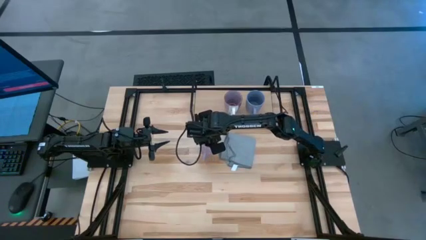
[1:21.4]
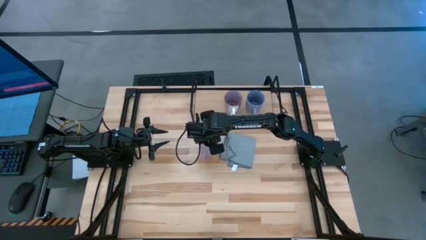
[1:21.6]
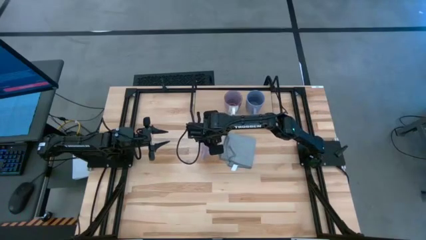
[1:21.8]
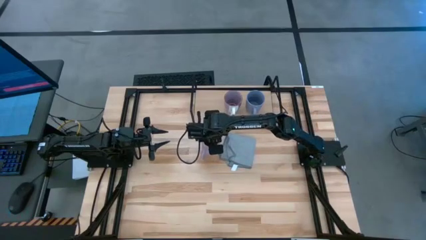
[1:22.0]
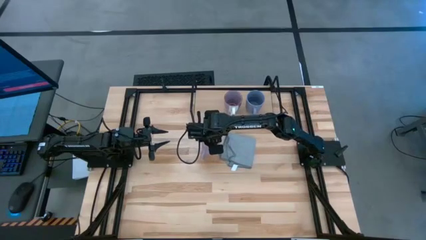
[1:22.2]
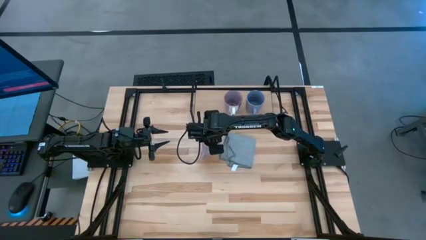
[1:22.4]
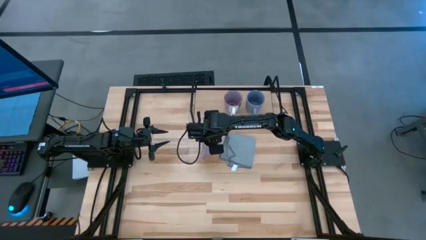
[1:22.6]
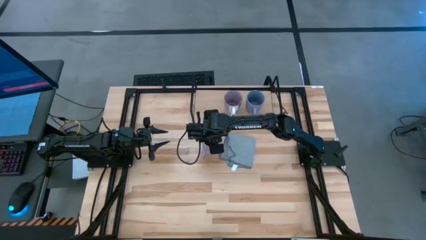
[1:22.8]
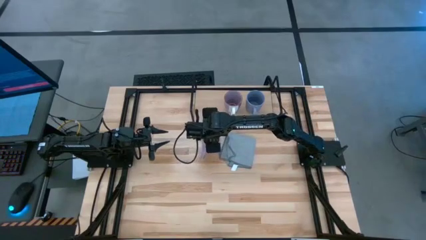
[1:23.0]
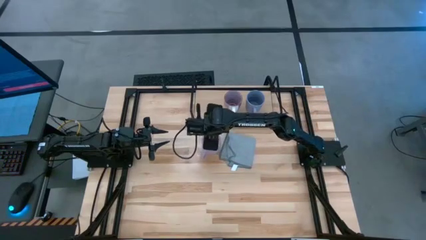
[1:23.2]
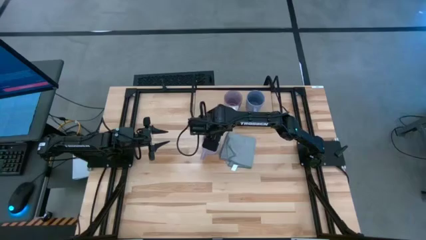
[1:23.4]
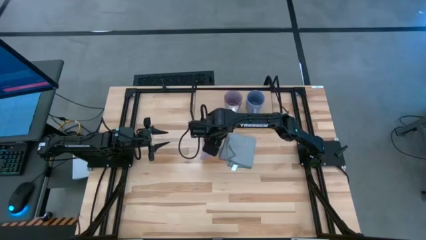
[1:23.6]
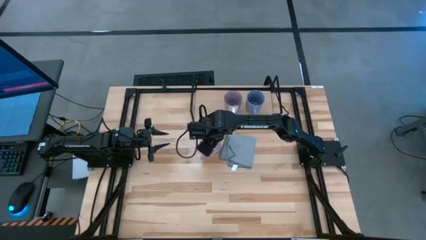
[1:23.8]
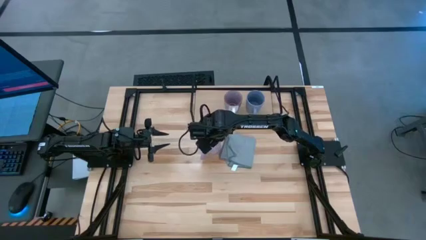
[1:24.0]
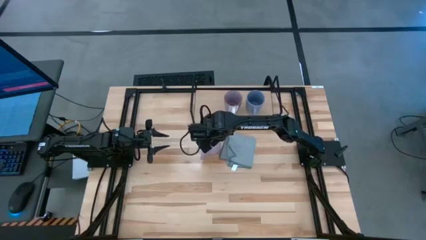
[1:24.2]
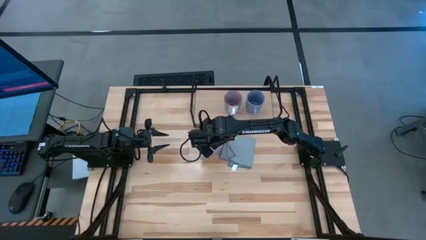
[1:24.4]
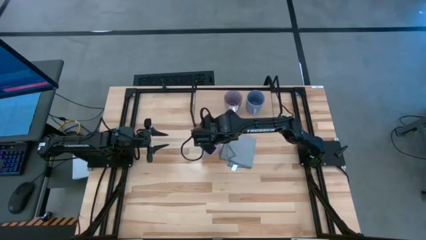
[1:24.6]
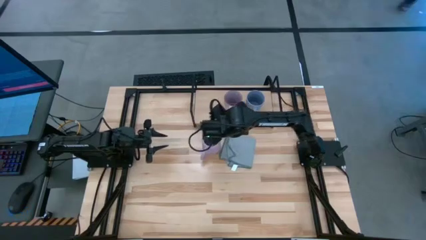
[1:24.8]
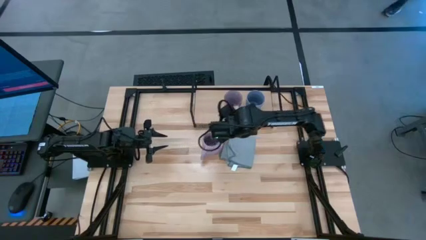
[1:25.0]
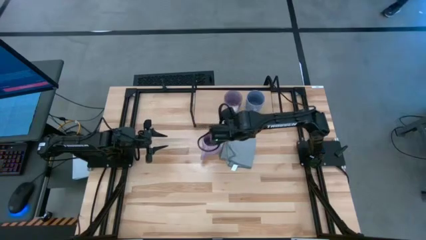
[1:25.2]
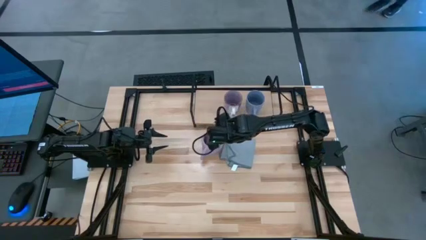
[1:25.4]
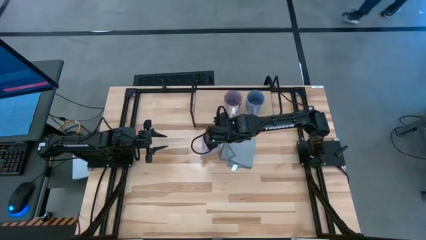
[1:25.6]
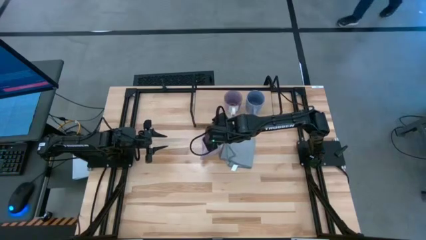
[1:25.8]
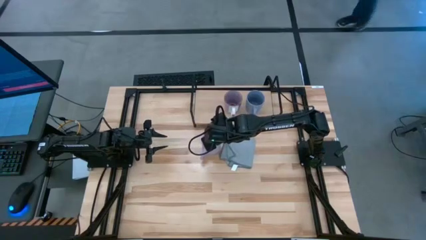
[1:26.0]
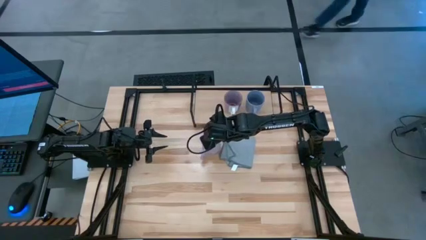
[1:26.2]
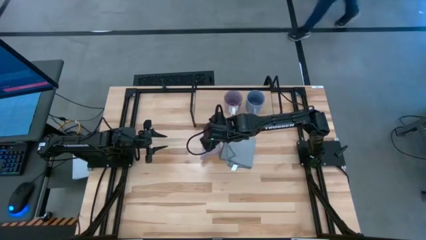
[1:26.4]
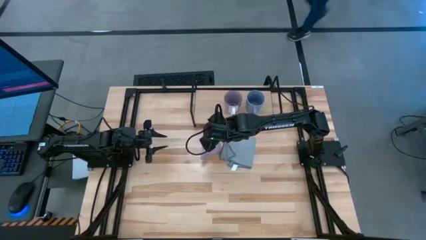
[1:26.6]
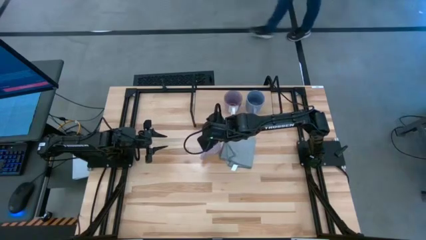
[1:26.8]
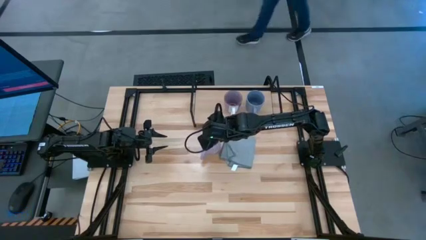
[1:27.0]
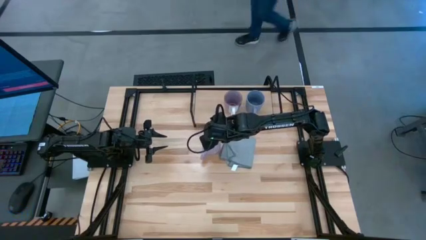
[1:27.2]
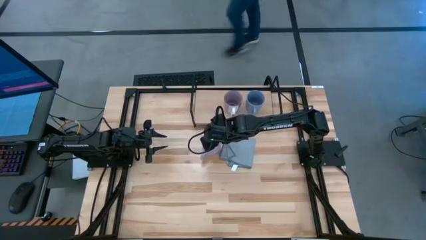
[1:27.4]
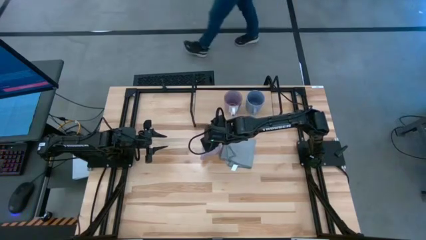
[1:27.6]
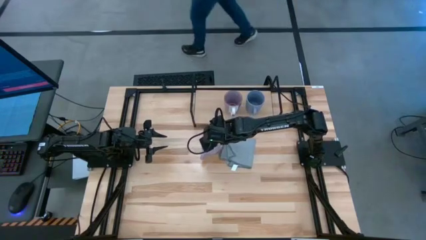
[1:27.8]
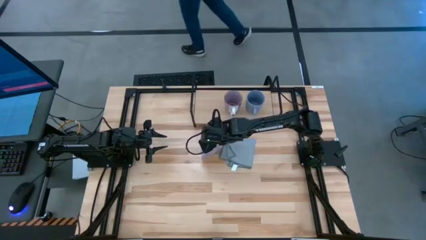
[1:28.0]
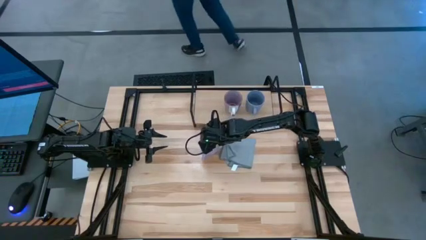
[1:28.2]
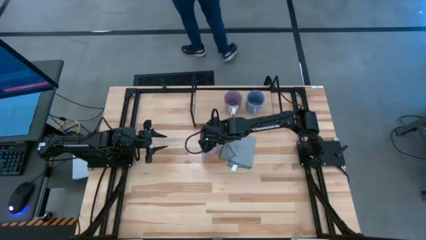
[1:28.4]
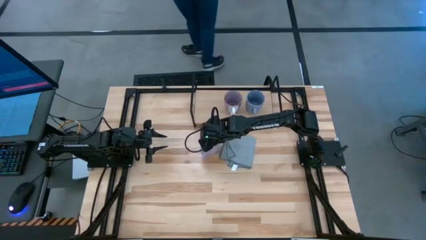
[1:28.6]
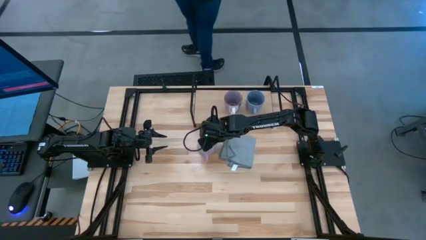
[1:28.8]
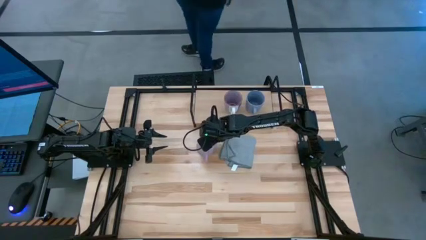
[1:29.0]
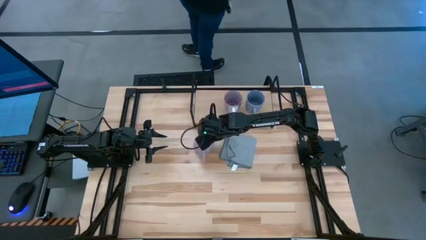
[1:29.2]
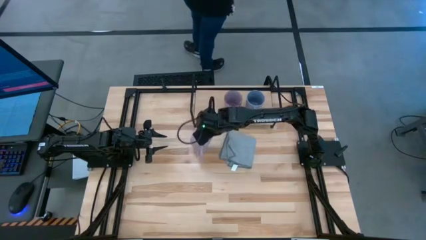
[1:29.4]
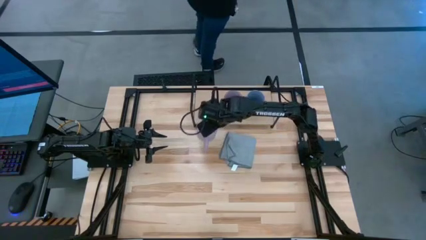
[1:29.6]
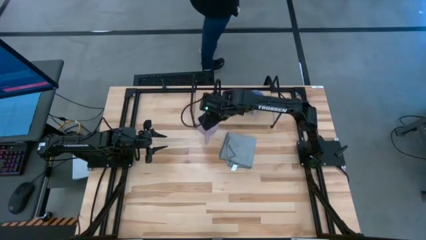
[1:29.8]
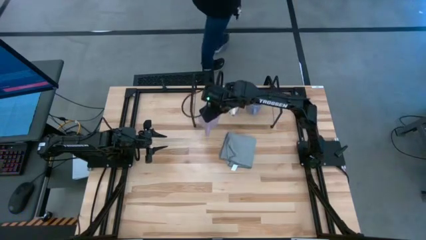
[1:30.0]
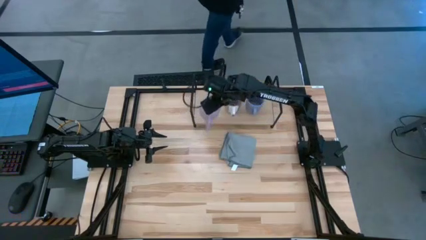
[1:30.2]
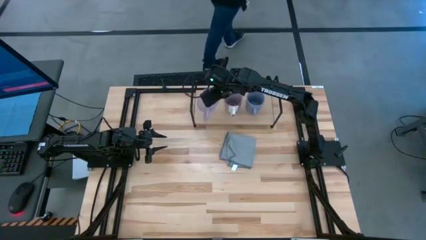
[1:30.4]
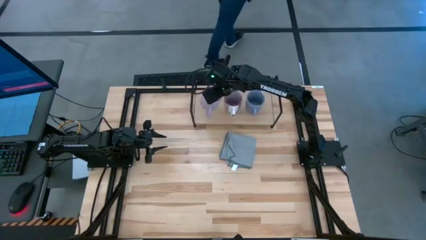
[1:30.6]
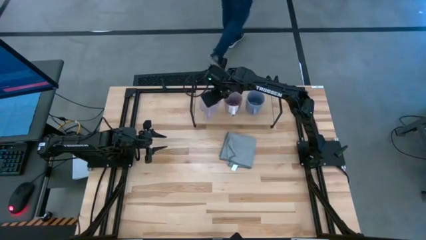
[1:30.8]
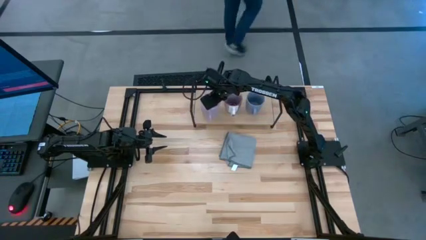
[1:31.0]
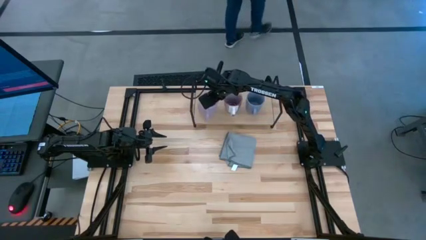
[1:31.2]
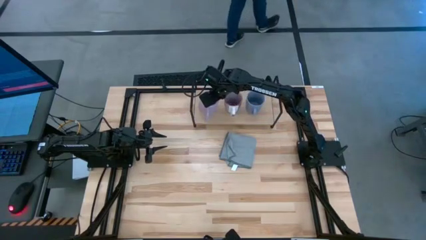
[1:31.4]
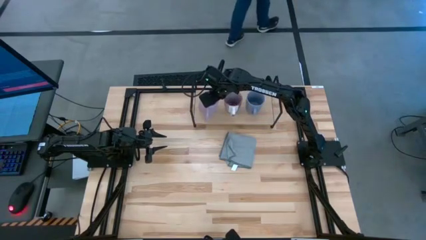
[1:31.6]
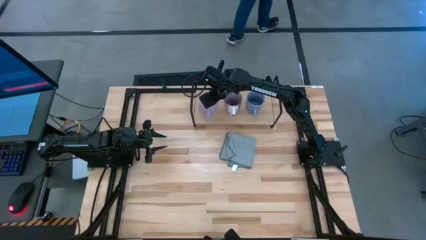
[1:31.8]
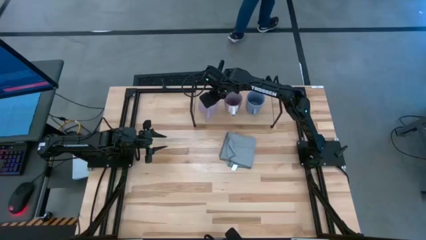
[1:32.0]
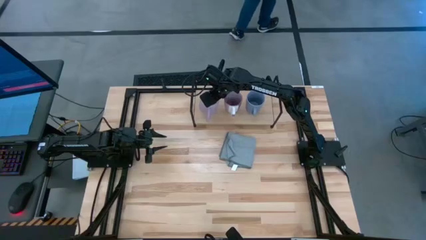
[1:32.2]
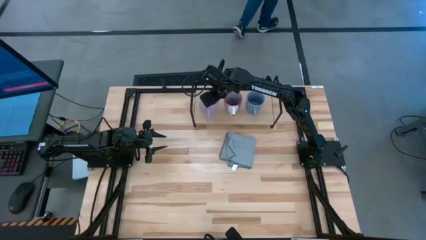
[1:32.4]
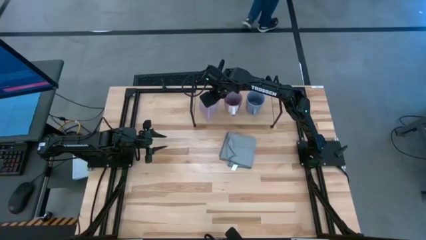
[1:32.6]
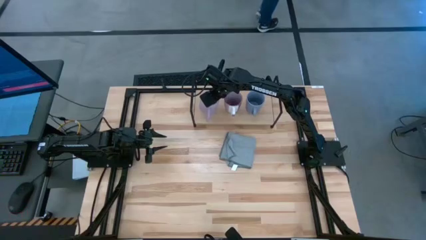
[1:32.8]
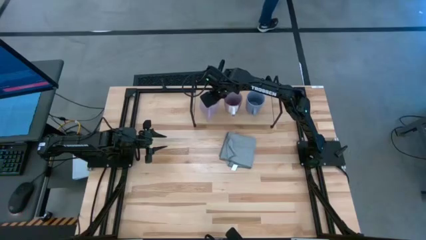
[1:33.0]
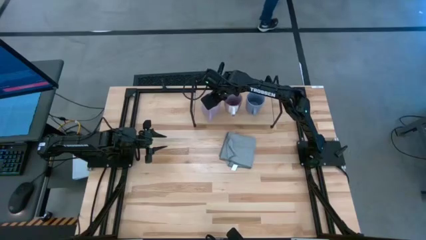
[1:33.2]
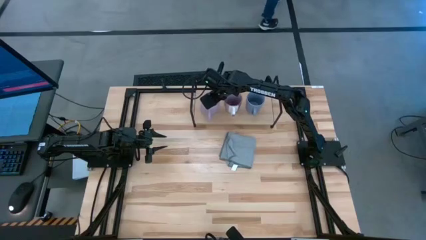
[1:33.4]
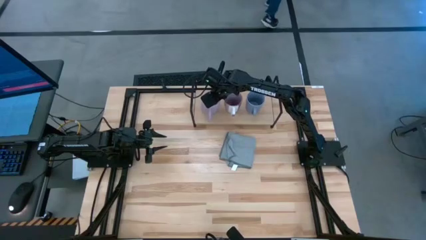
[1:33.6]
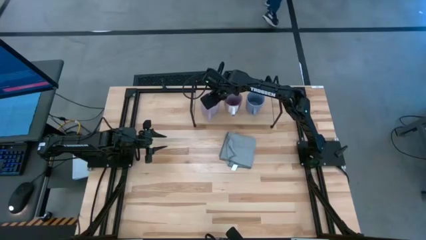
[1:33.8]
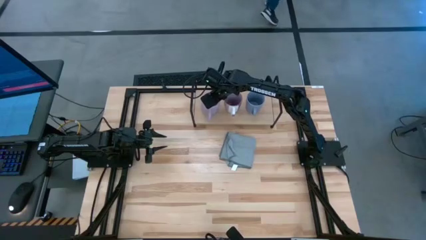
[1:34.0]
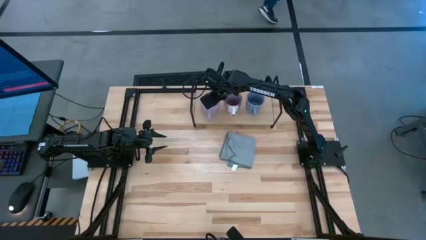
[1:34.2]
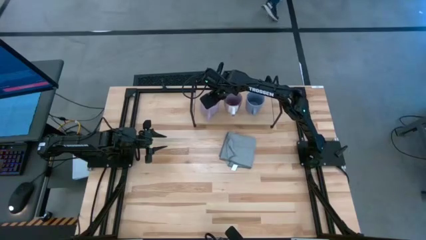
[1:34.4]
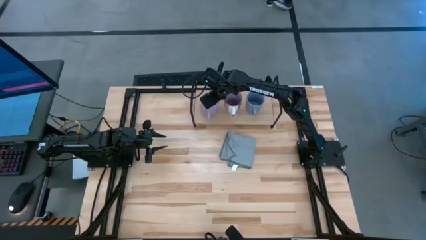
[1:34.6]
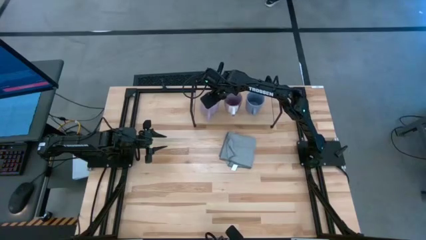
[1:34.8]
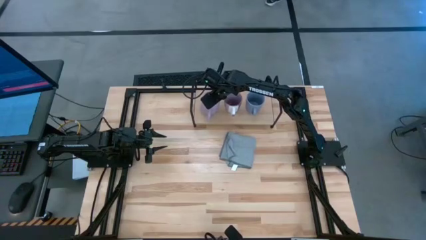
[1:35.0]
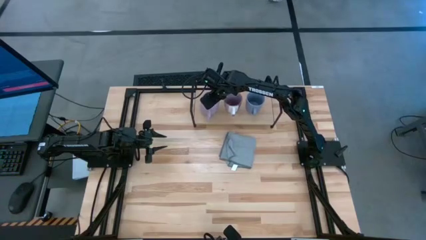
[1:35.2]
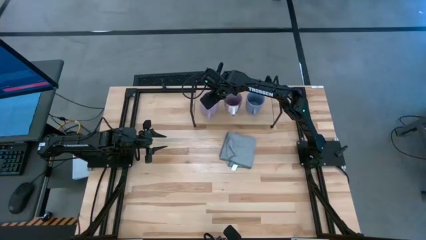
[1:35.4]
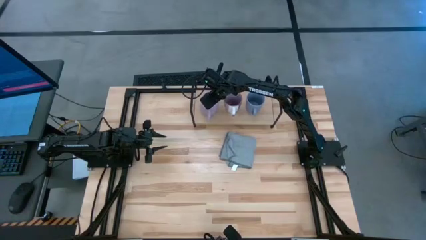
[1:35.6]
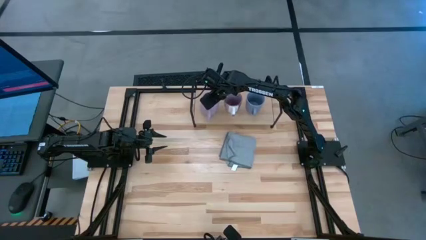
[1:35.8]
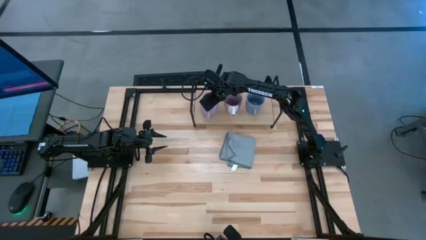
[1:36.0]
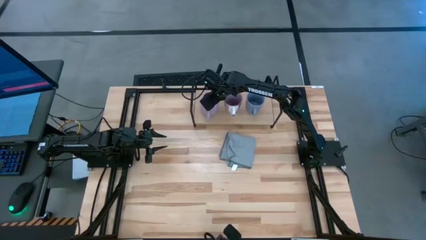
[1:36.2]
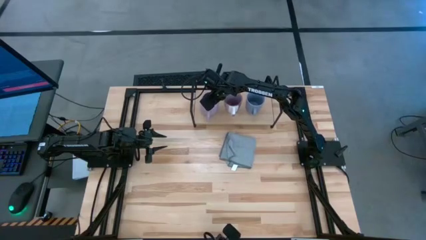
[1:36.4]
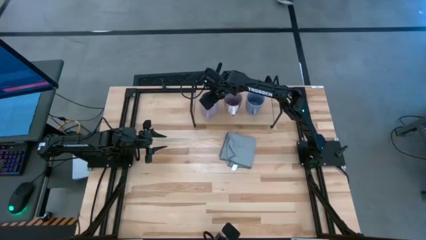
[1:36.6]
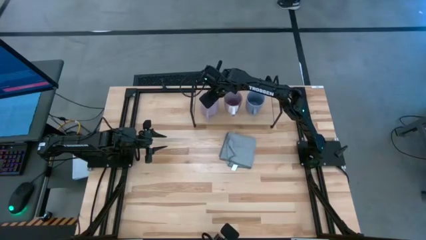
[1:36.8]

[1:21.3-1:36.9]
Task: Stack small to large cups/mugs on shelf
Put the purple mug on the shelf
